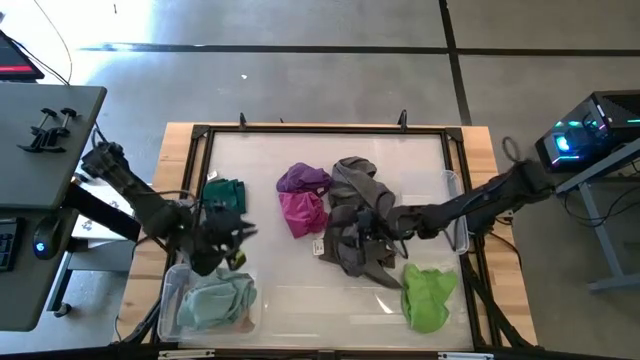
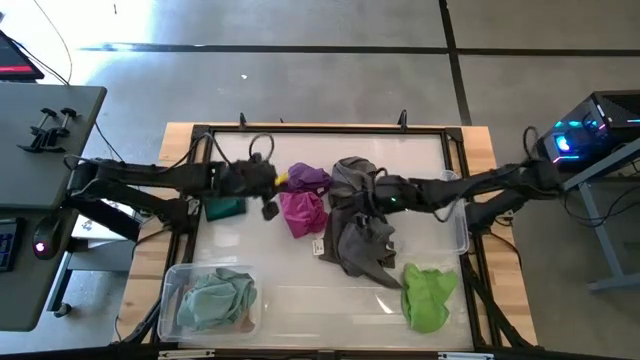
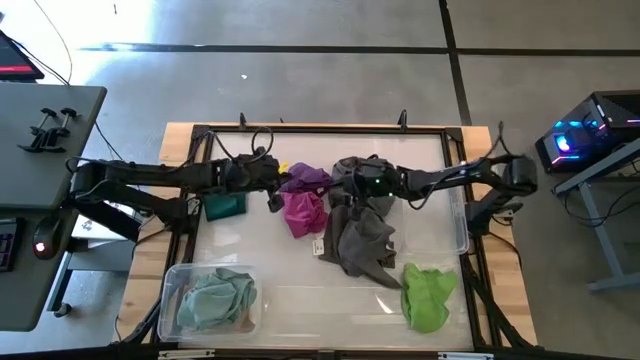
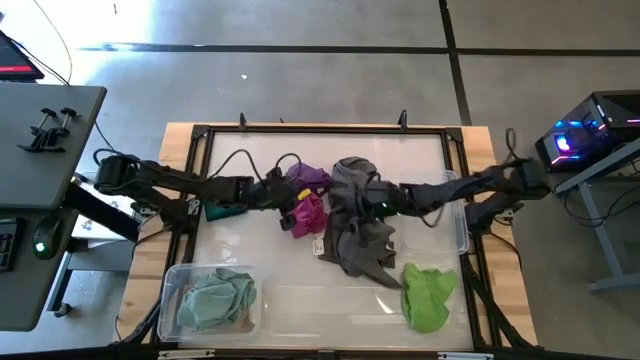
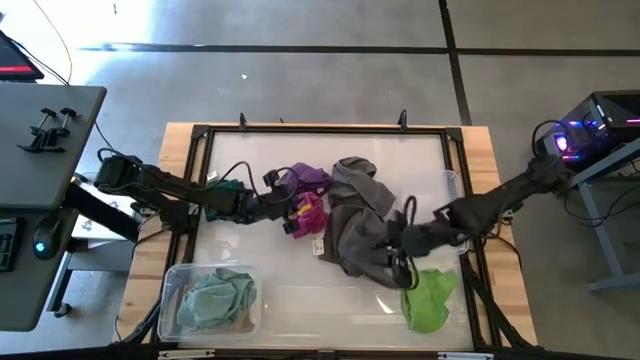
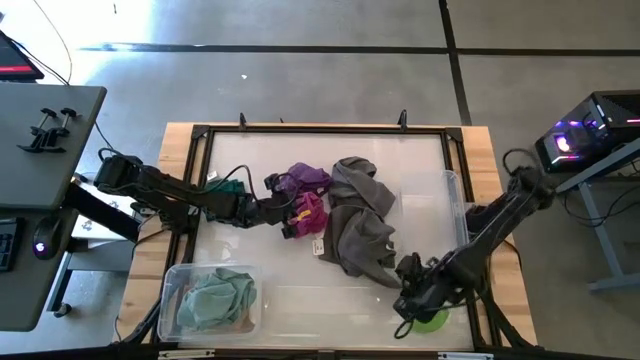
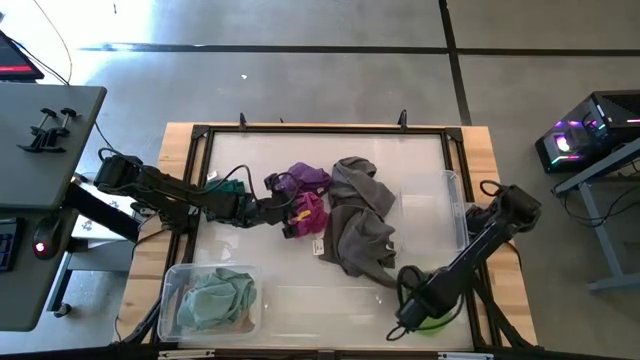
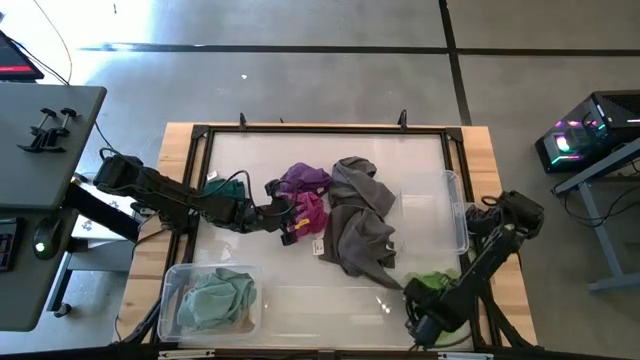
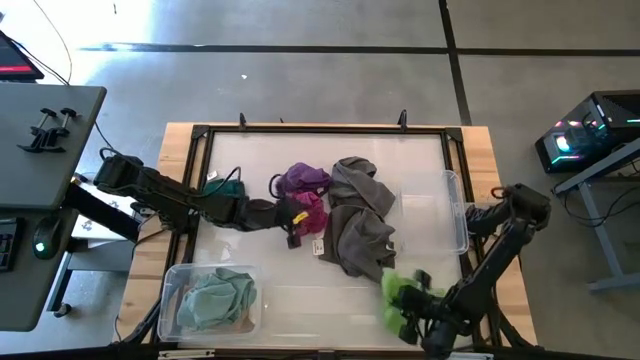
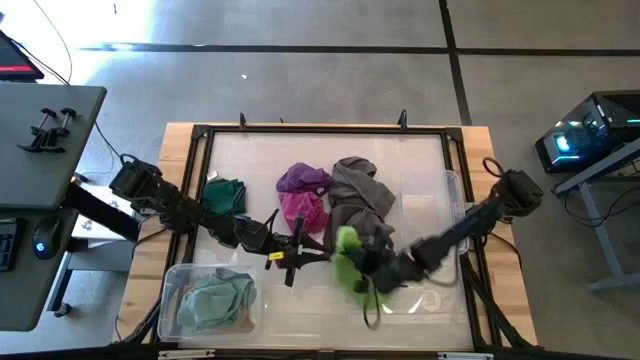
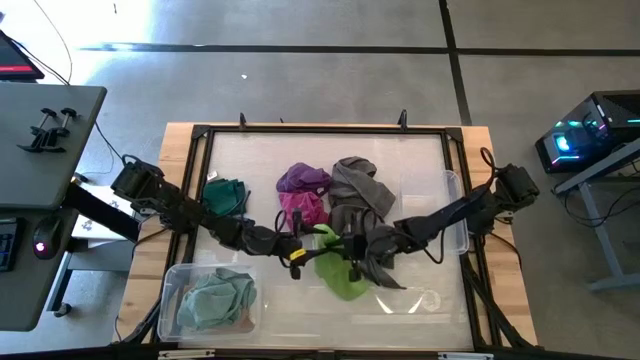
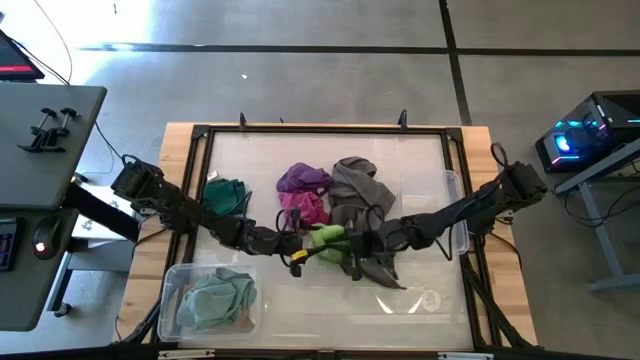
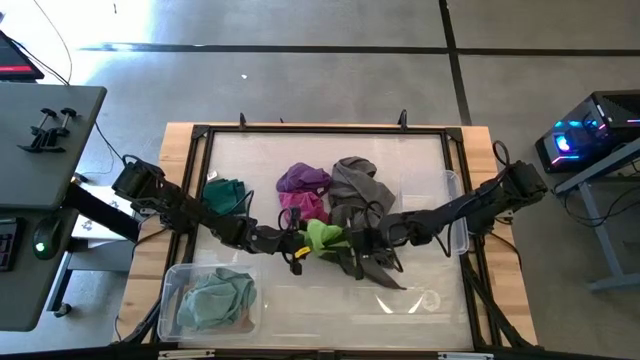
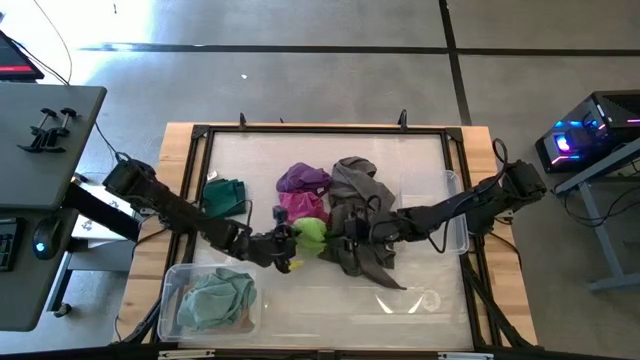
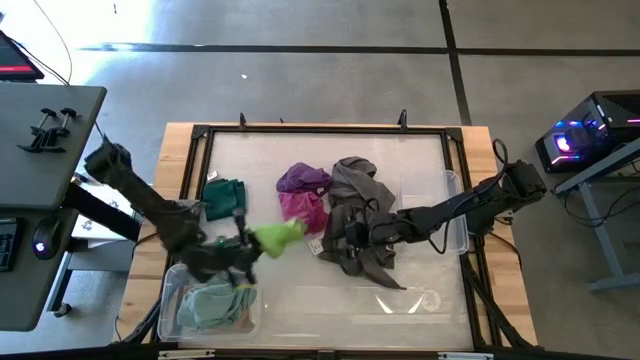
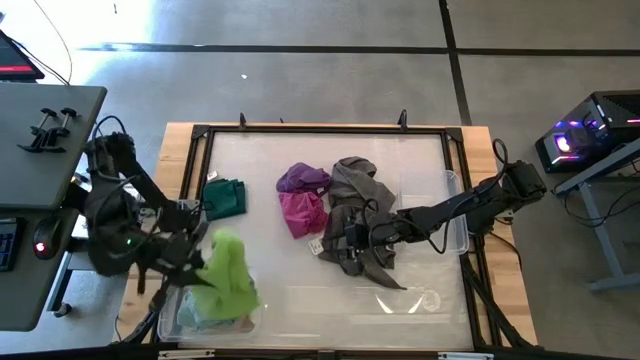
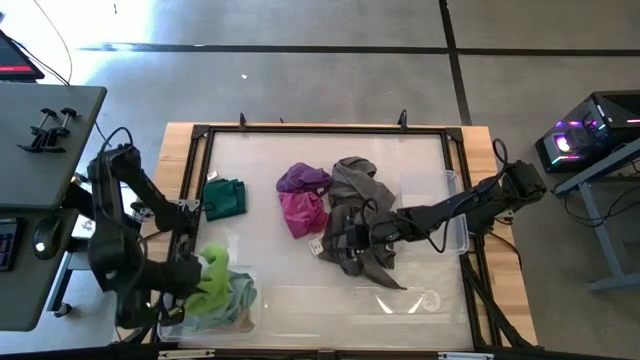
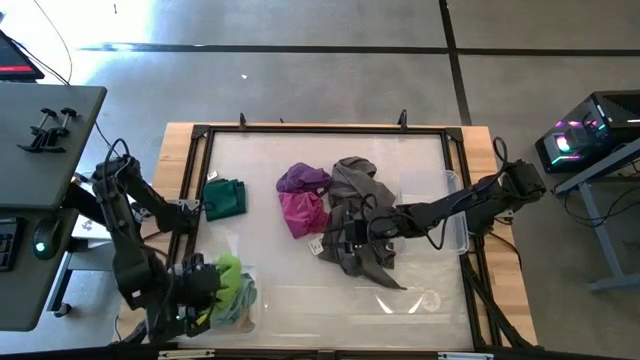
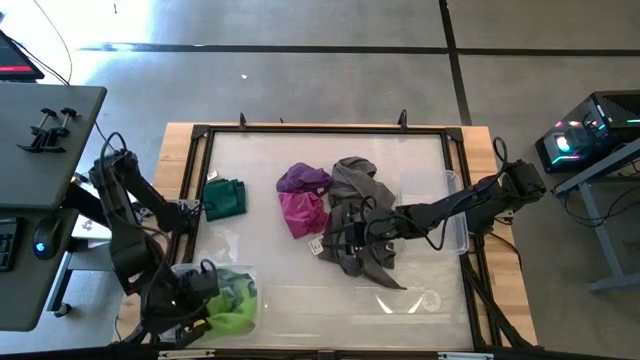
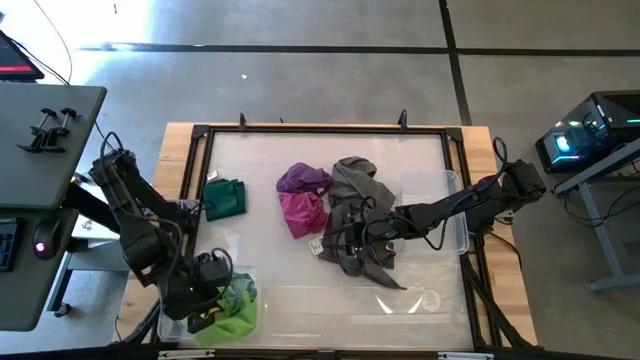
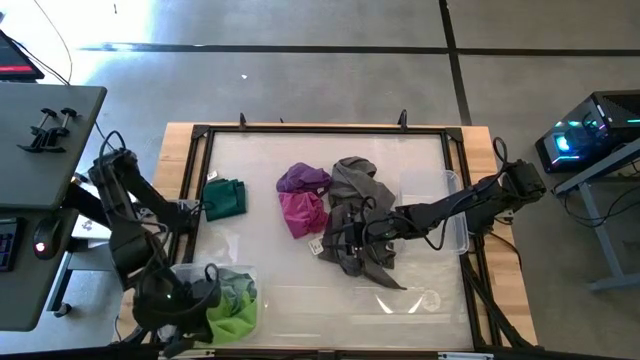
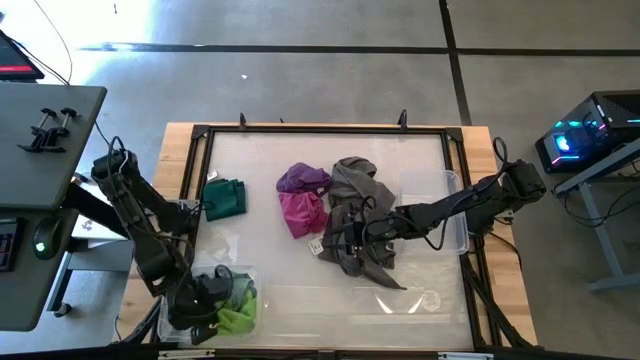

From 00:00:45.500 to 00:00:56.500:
Task: Sort microfiber towel by color & place in baskets
Put the green microfiber towel into the bottom transparent bin

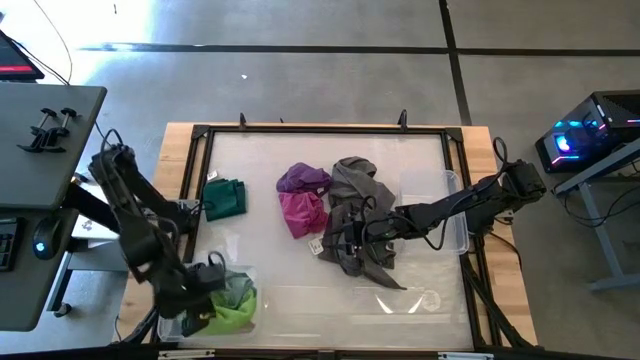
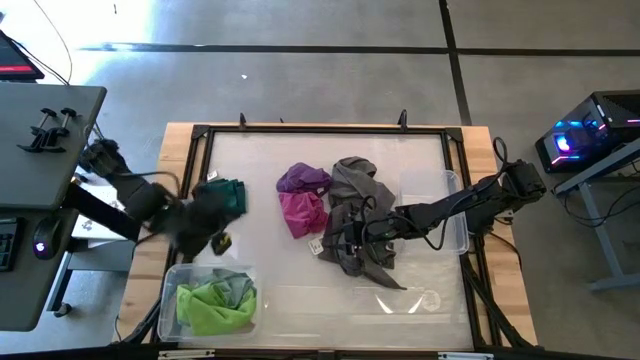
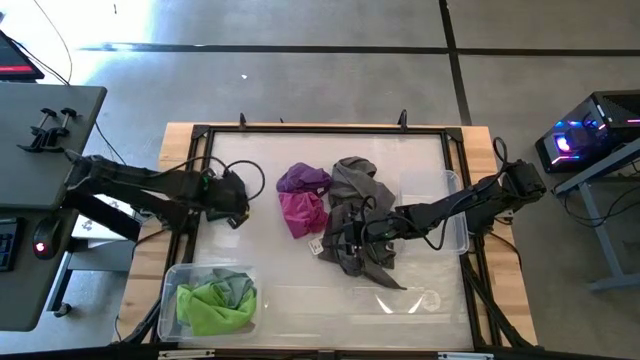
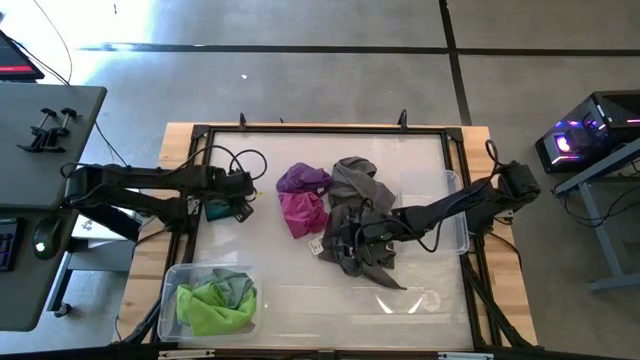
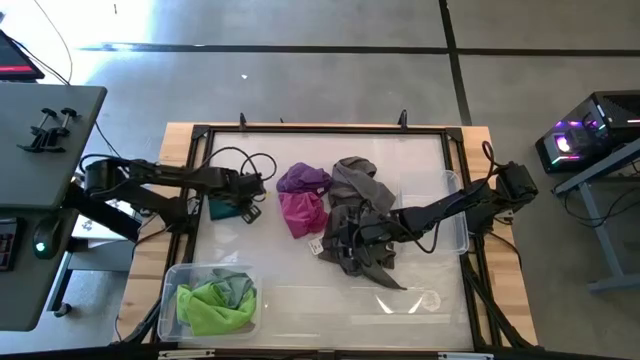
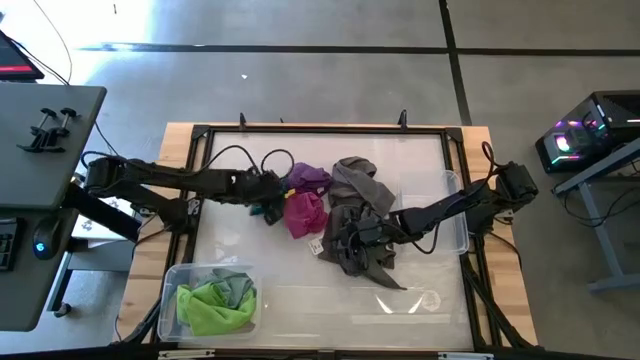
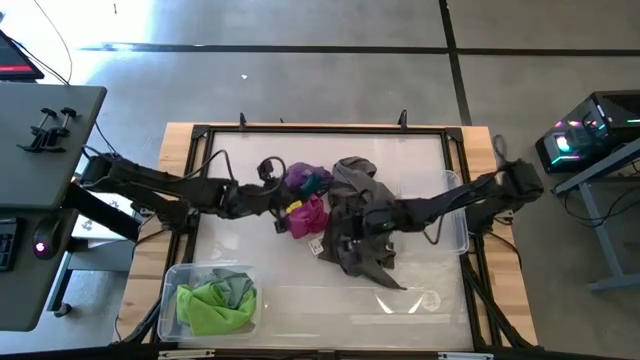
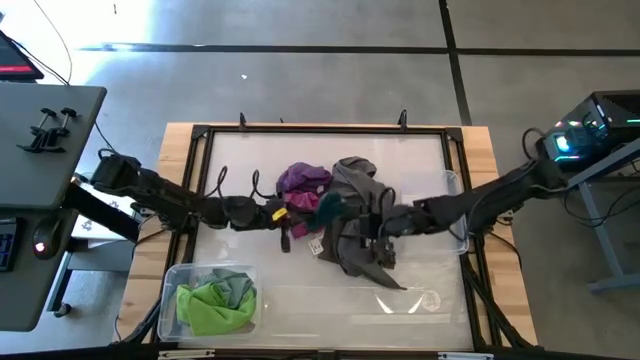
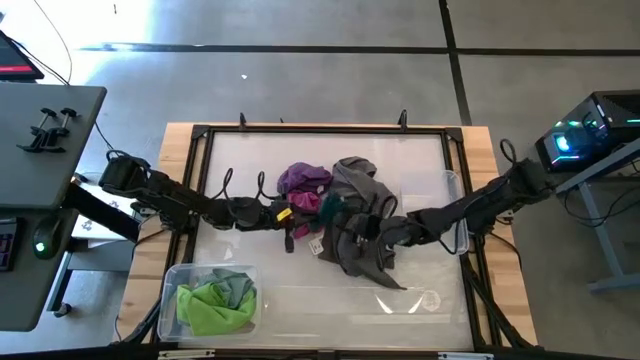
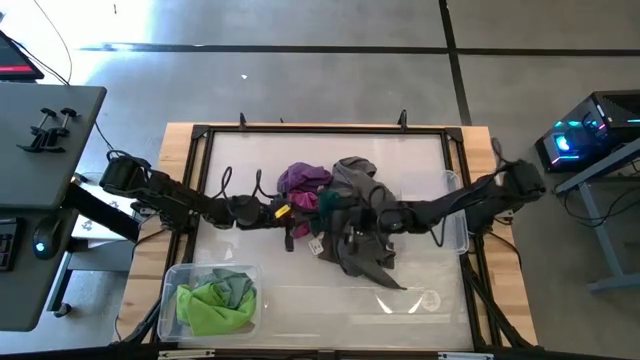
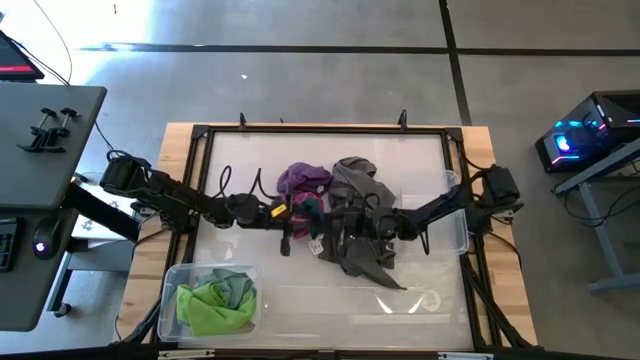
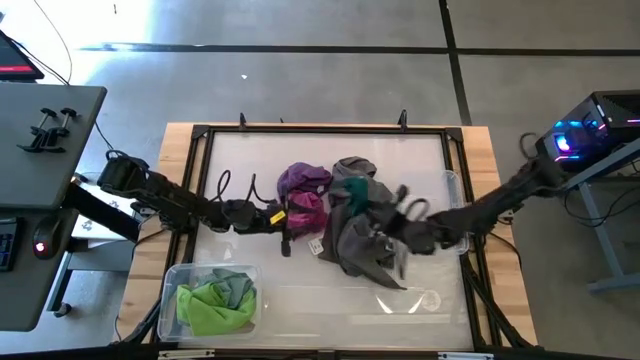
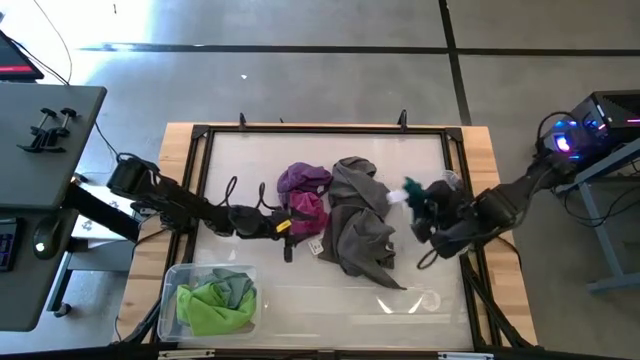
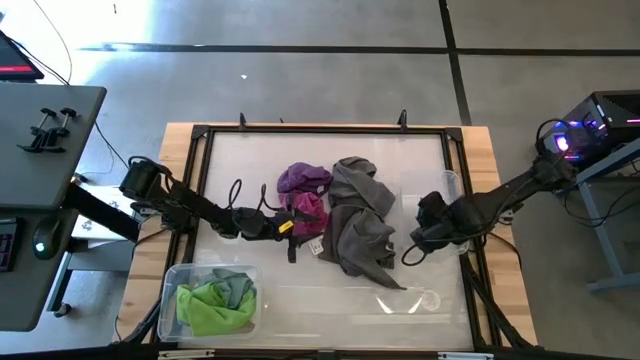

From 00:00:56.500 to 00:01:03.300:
Put the dark blue microfiber towel into the top transparent bin

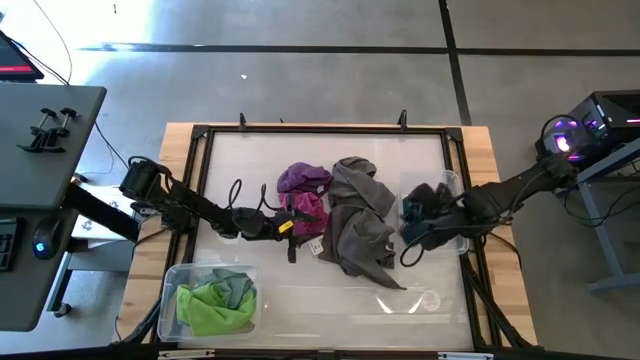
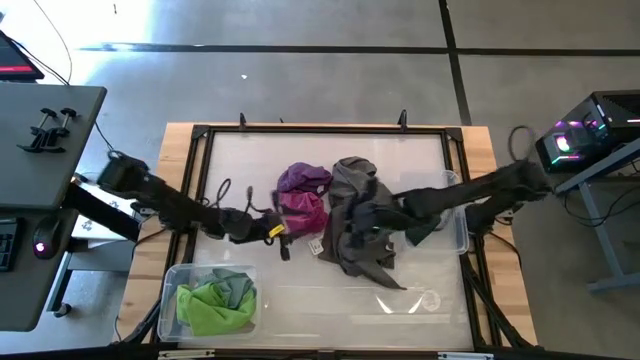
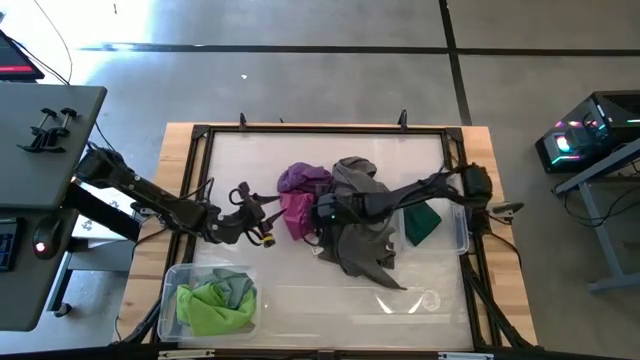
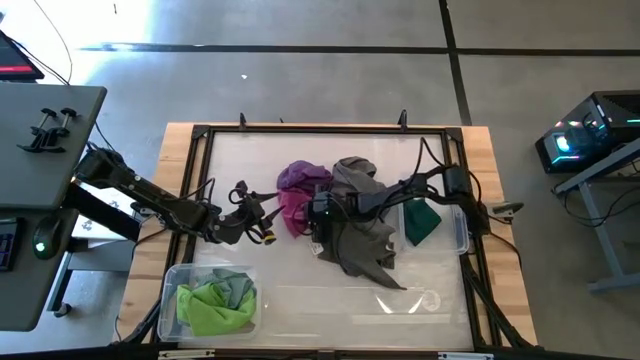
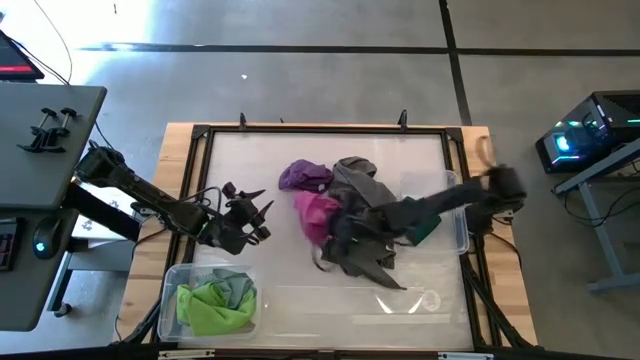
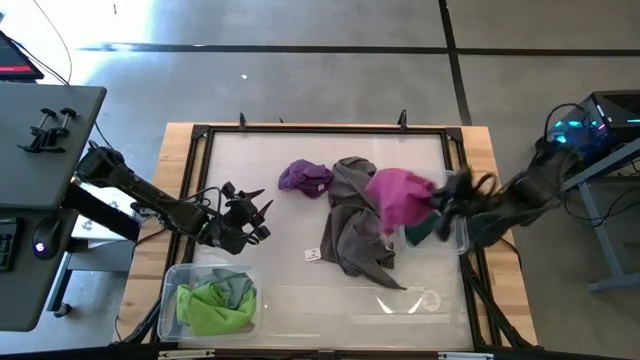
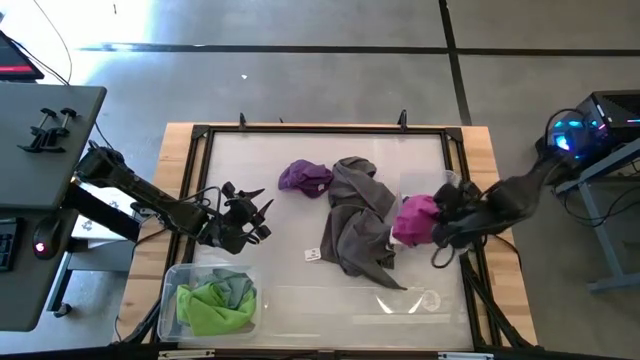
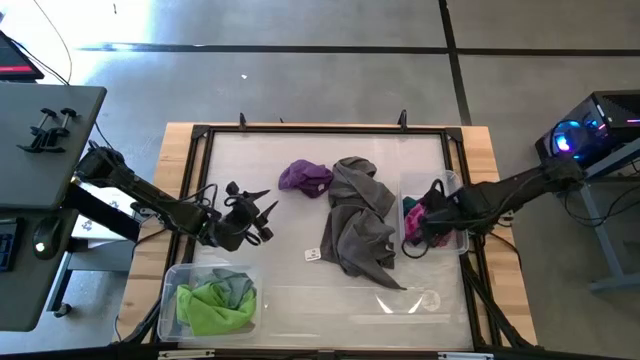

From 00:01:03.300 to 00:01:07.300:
Put the pink microfiber towel into the top transparent bin
